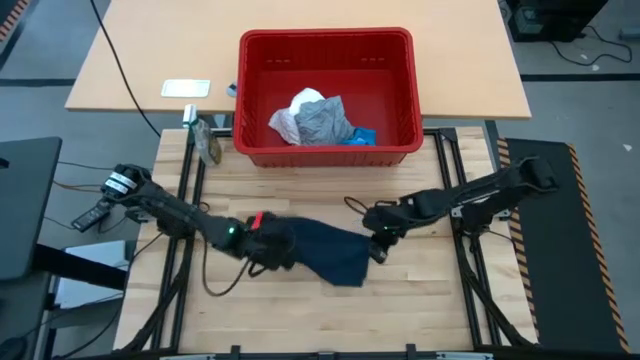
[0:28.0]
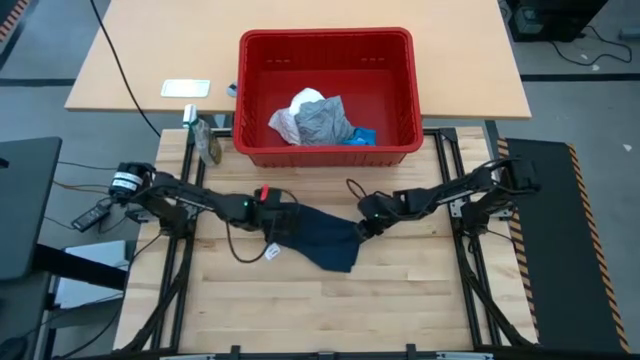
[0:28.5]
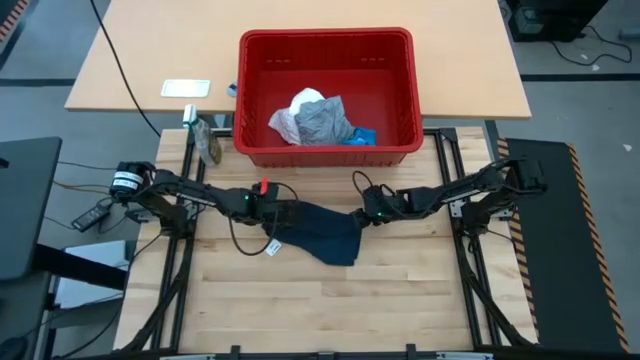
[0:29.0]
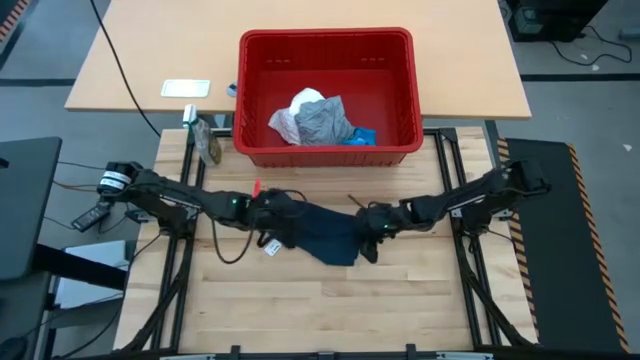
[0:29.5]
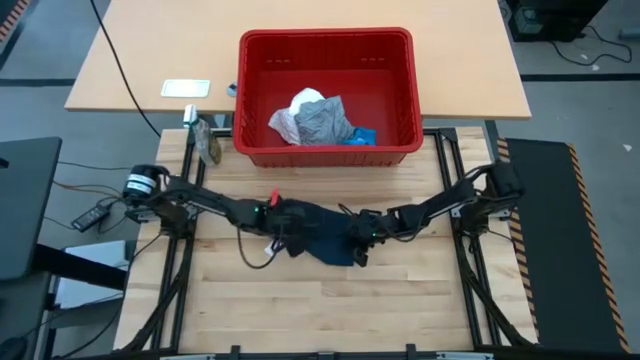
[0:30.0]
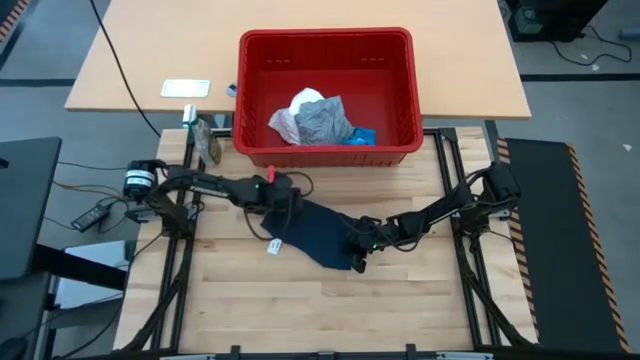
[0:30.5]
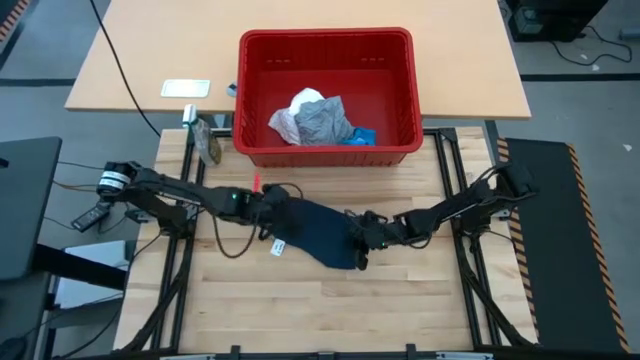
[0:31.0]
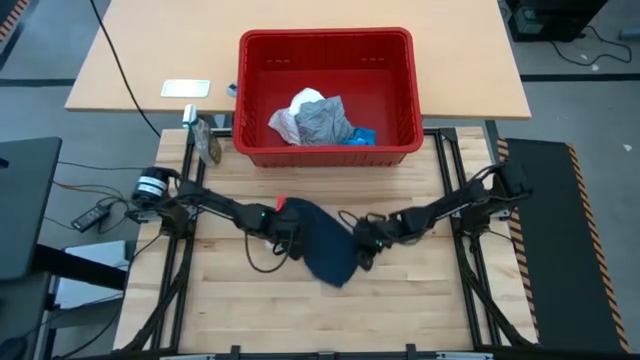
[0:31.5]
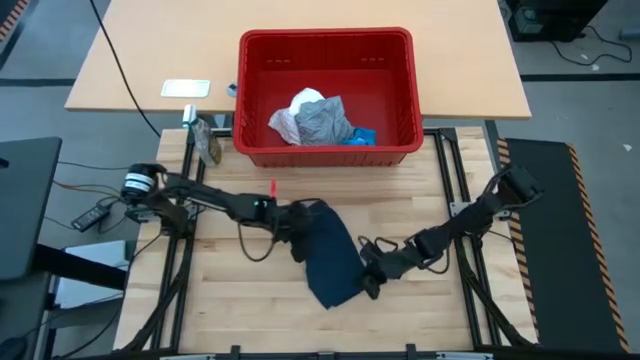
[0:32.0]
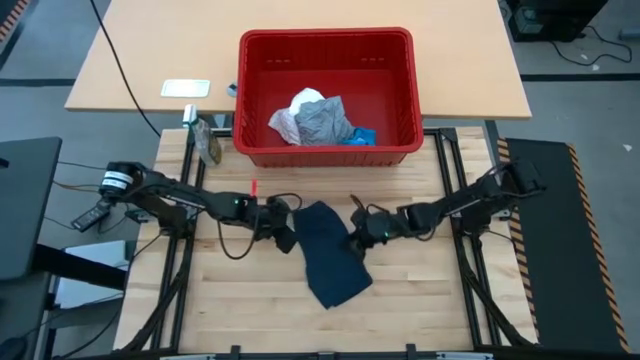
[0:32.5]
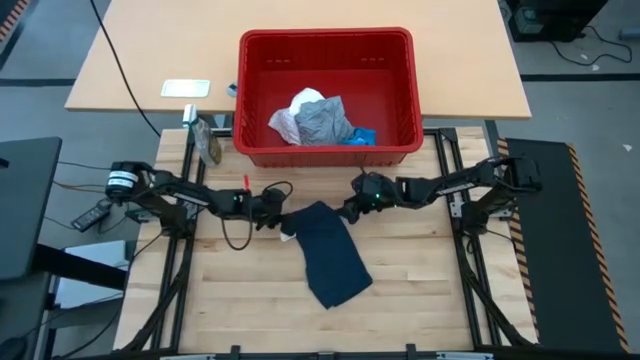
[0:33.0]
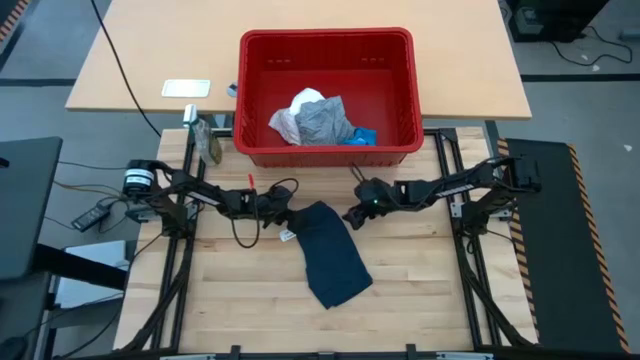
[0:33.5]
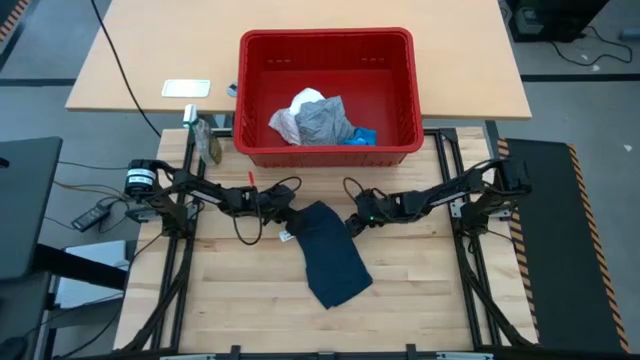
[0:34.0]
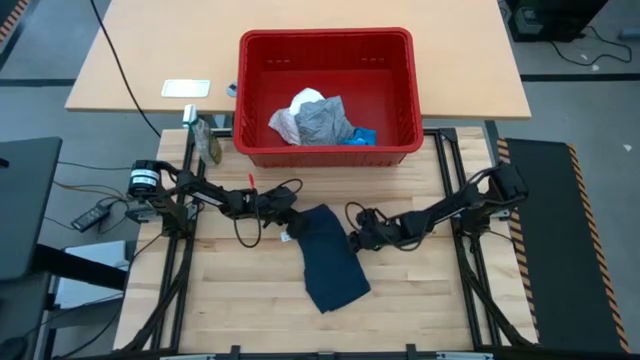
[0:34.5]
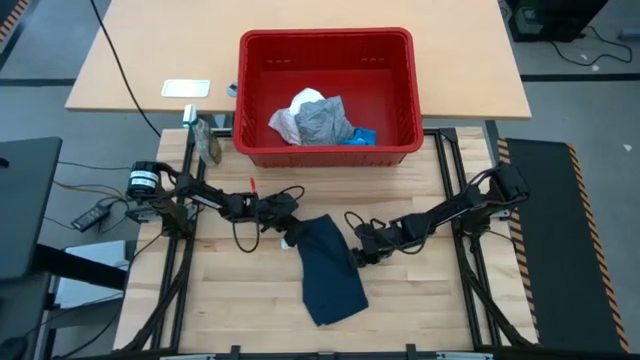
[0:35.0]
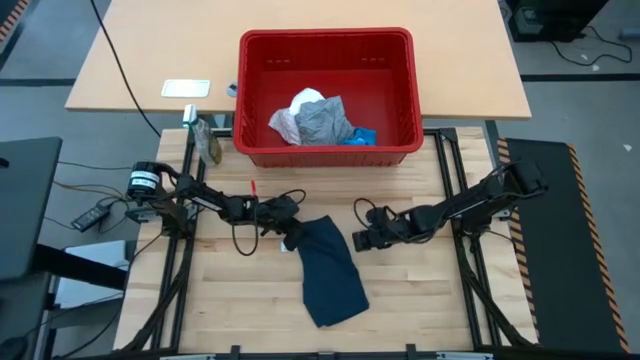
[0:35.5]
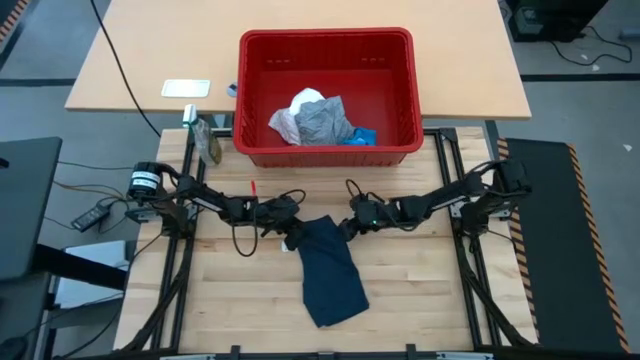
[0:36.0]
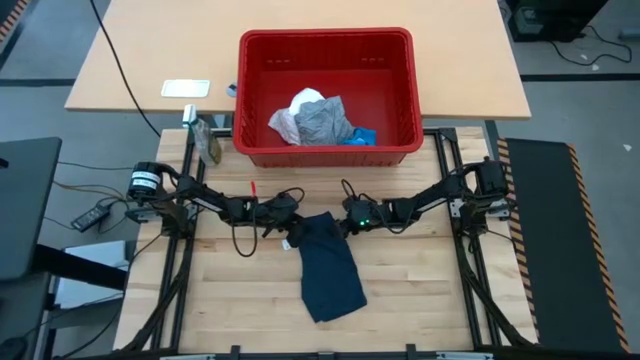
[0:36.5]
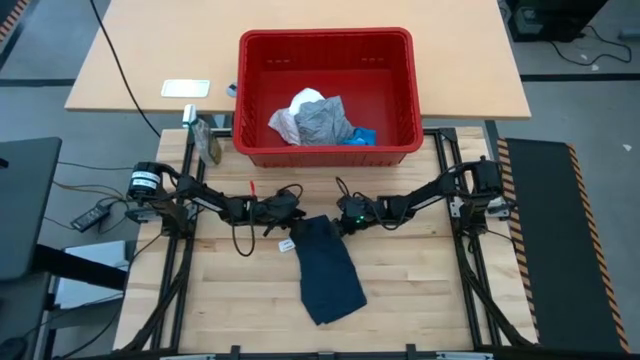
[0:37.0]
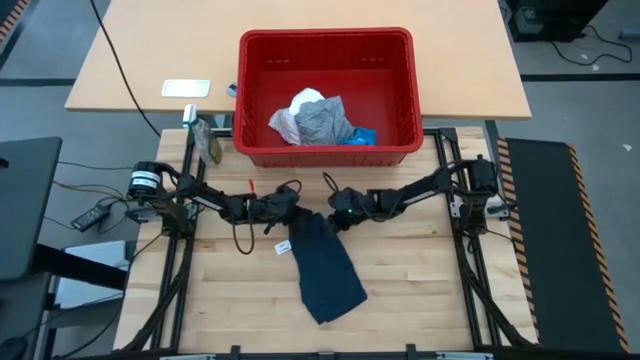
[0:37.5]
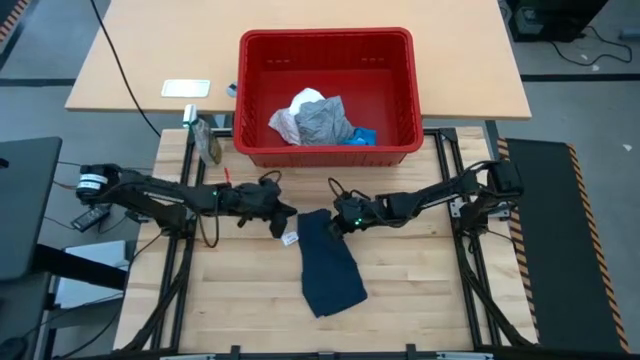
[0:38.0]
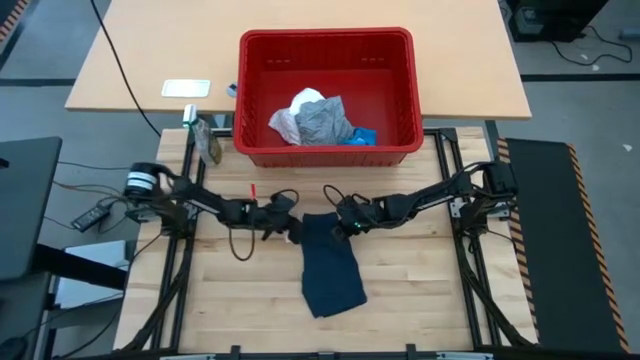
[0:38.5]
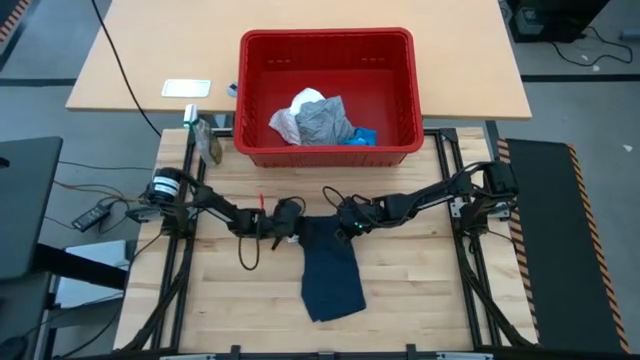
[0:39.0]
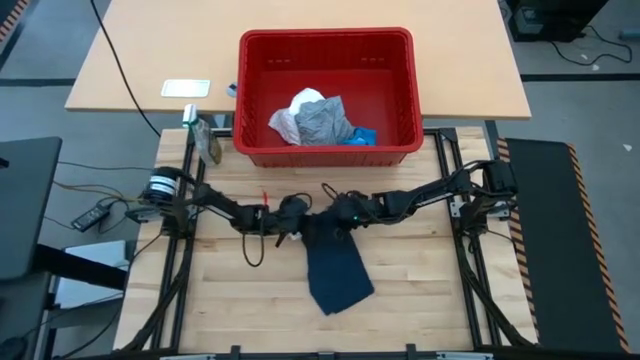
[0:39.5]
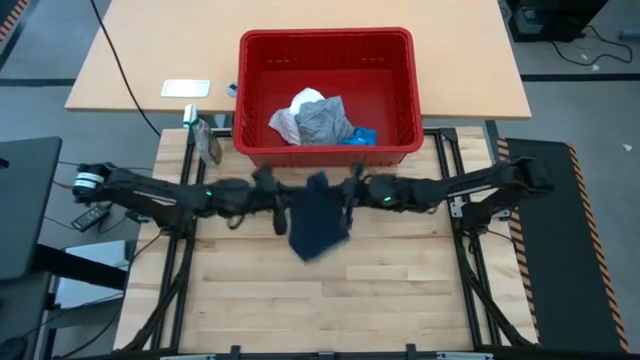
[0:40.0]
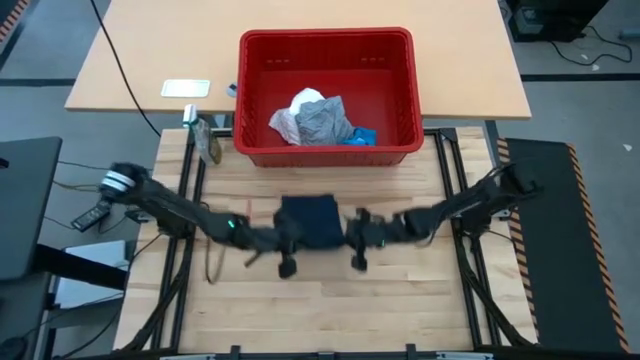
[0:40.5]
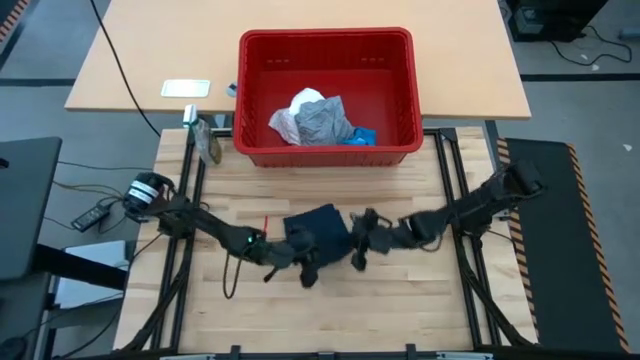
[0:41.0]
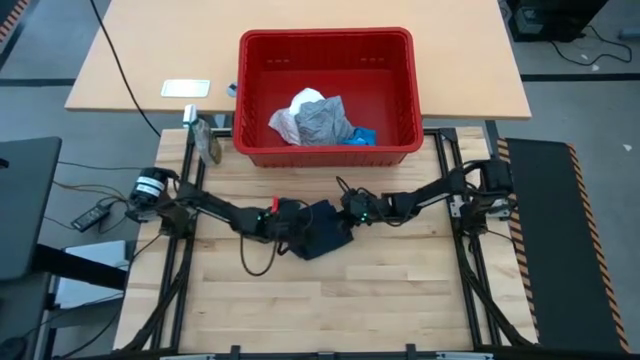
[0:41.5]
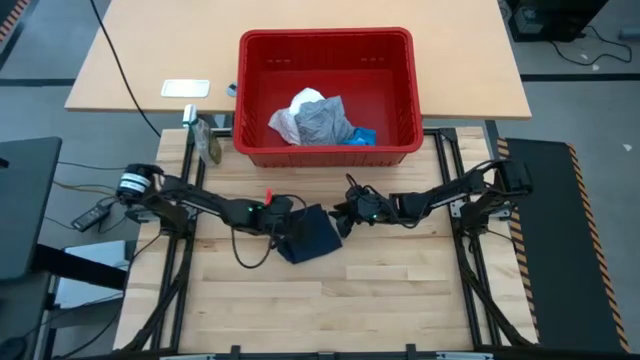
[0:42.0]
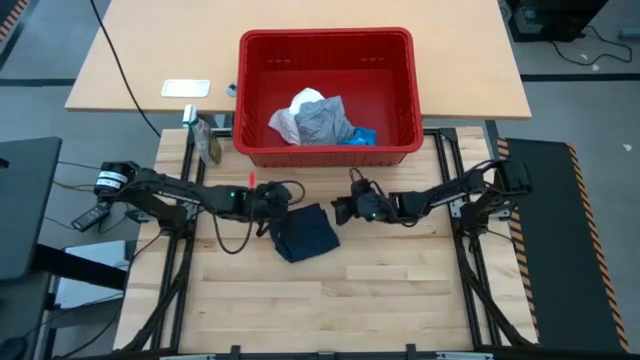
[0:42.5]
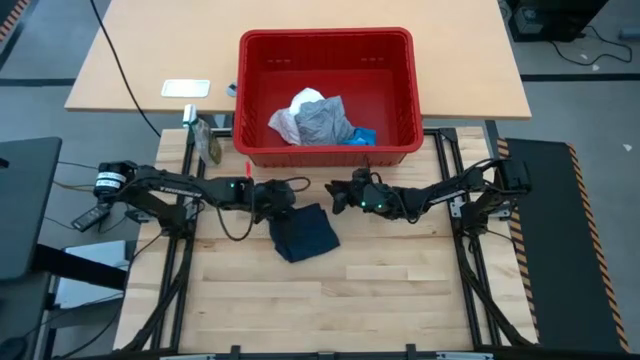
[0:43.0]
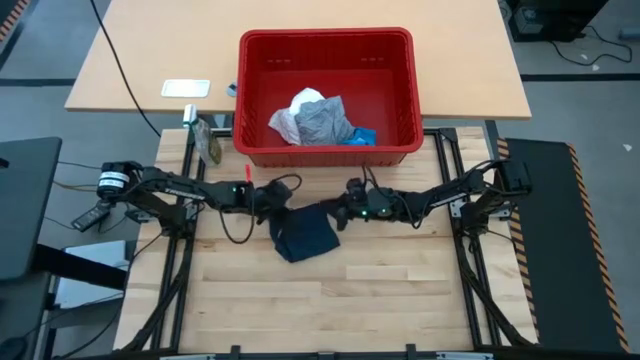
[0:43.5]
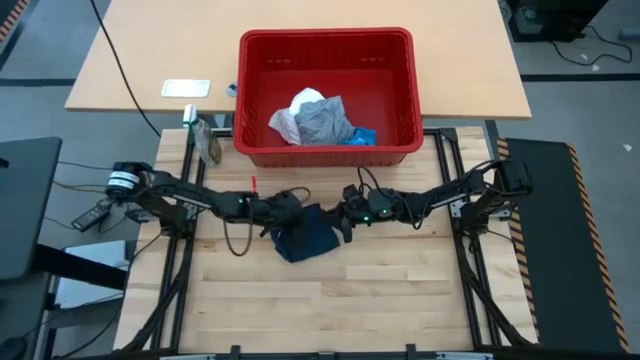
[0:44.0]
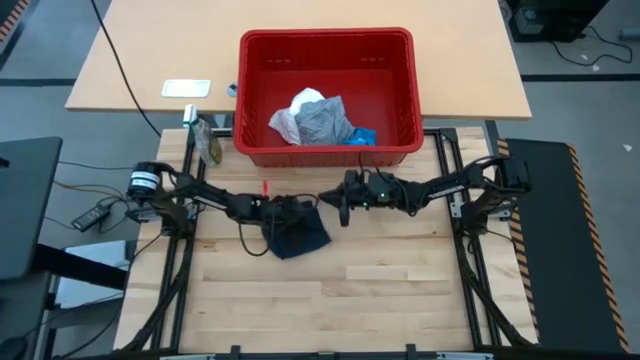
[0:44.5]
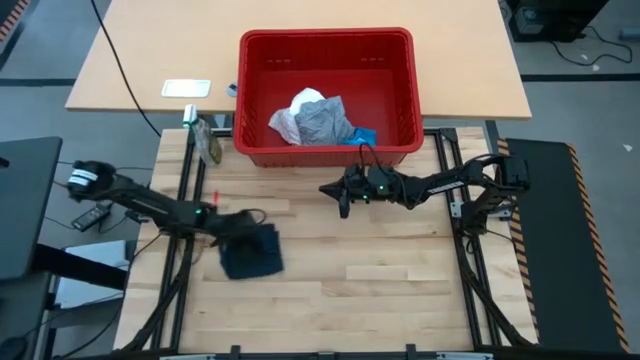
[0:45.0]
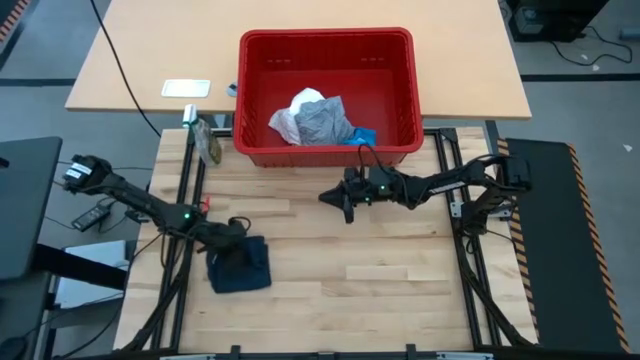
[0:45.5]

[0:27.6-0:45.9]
Task: Fold laundry
Fold the dark blue shorts

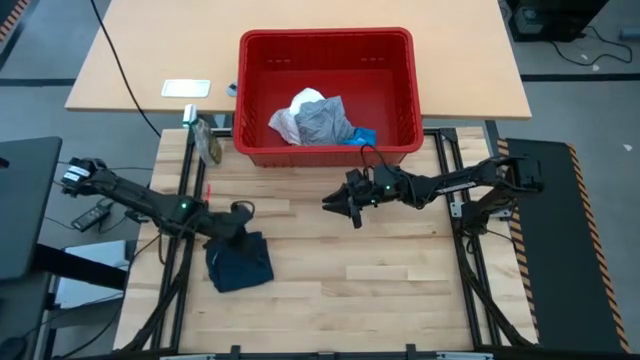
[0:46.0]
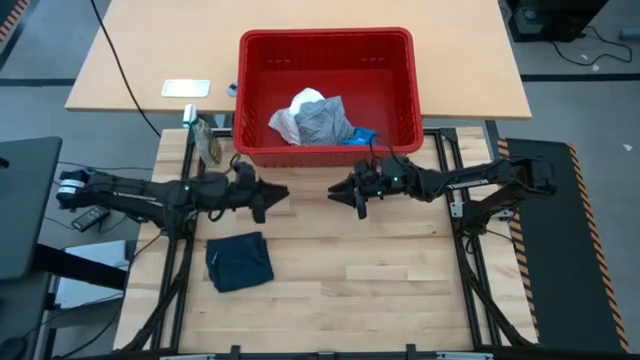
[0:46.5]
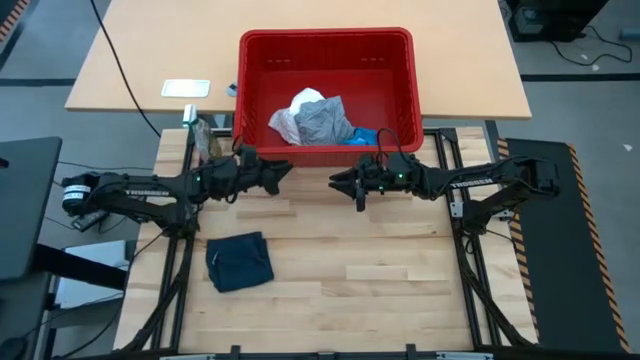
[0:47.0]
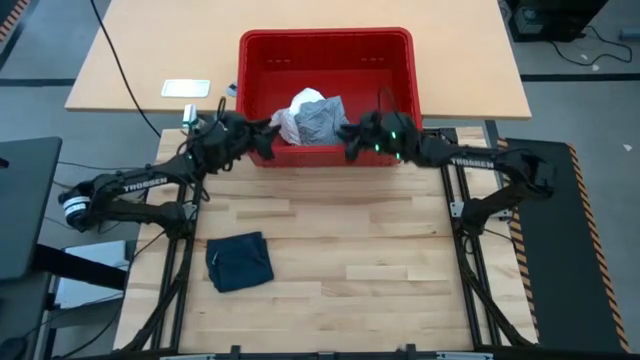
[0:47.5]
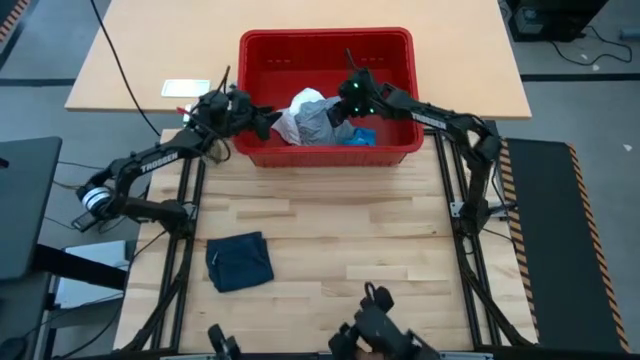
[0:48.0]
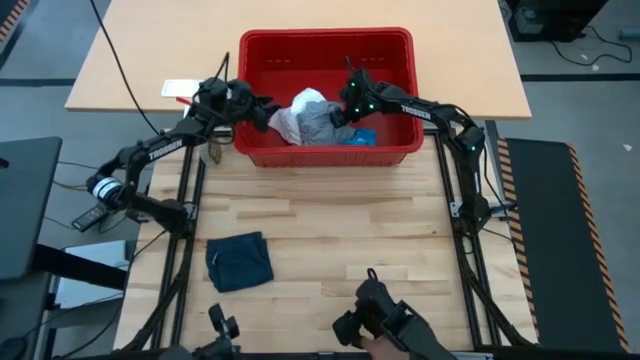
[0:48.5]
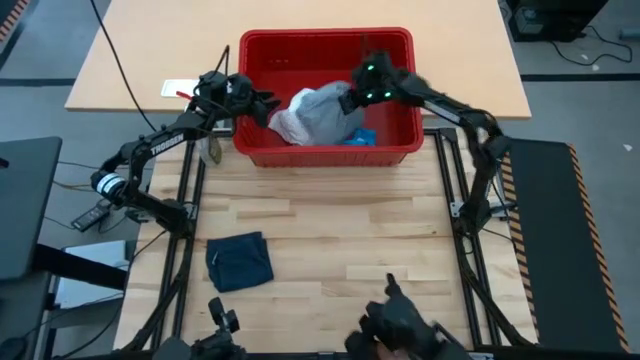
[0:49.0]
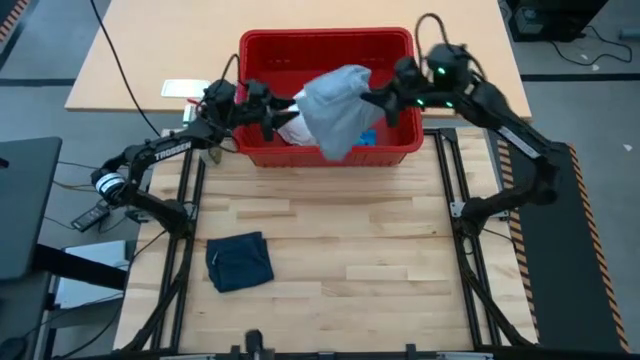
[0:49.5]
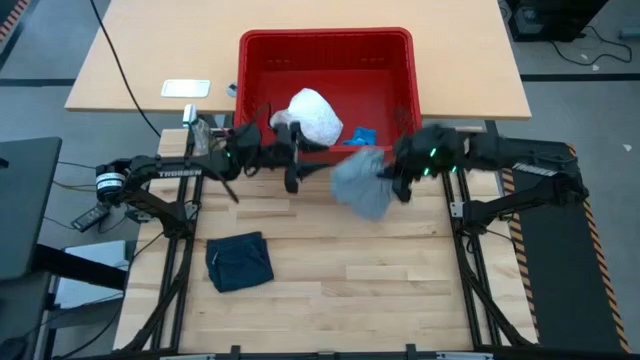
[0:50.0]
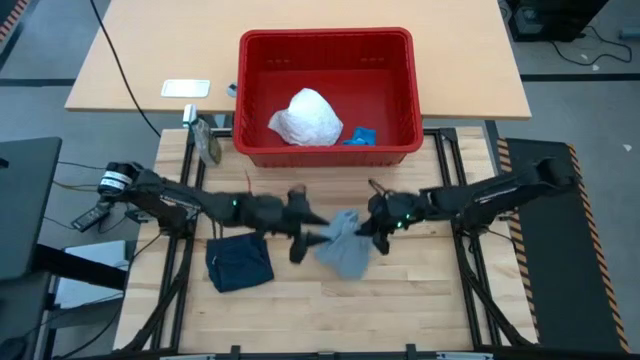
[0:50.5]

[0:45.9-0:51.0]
Remove the gray shirt from the red laundry bin
